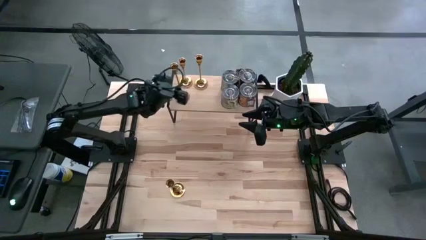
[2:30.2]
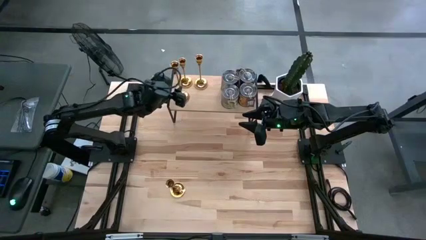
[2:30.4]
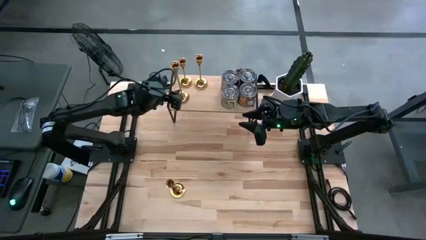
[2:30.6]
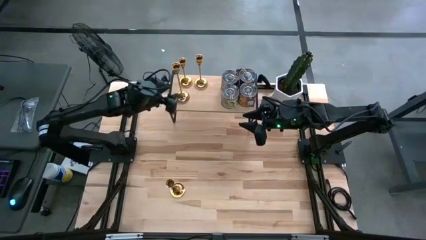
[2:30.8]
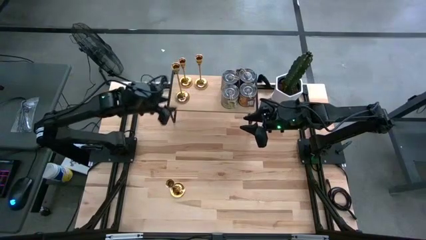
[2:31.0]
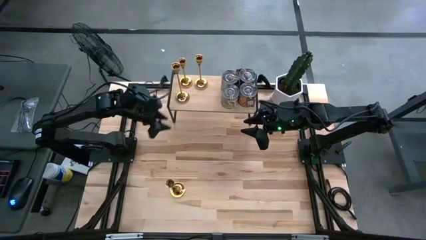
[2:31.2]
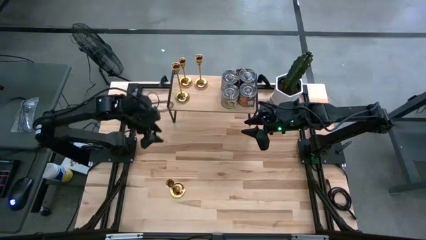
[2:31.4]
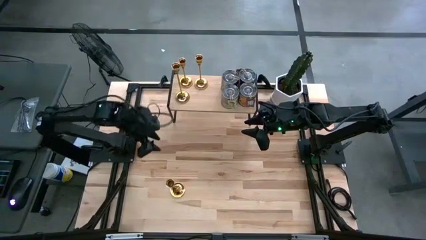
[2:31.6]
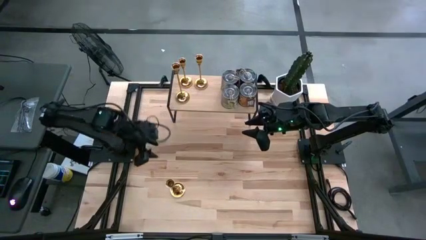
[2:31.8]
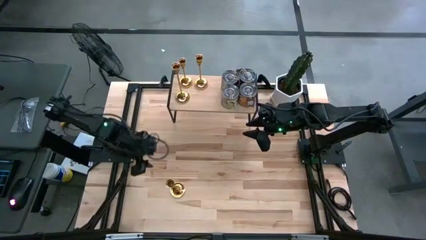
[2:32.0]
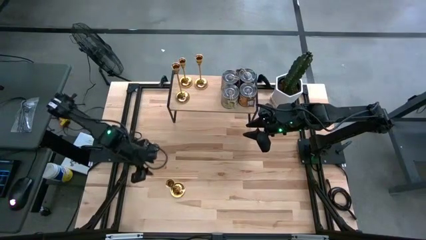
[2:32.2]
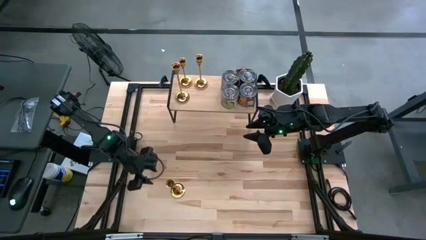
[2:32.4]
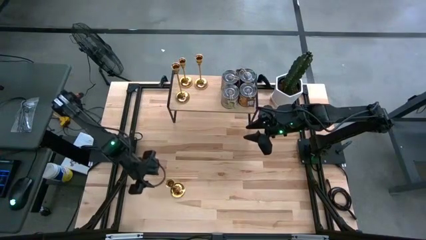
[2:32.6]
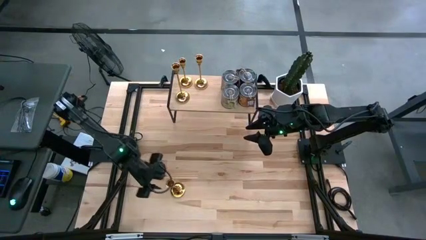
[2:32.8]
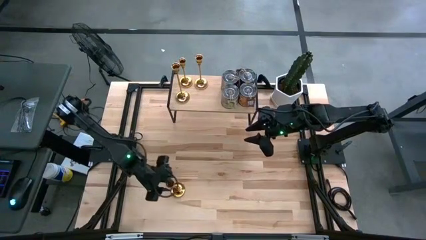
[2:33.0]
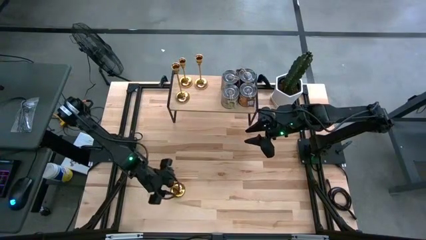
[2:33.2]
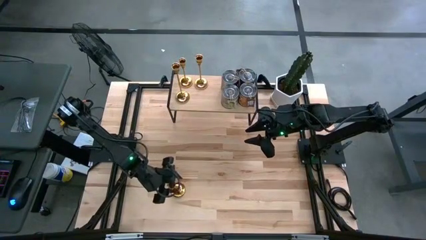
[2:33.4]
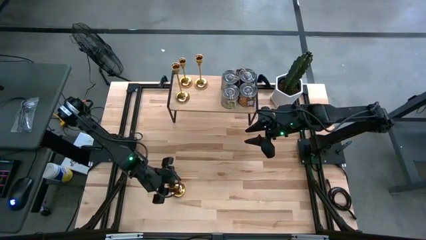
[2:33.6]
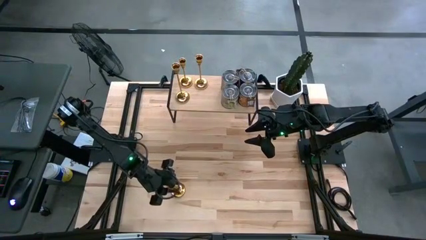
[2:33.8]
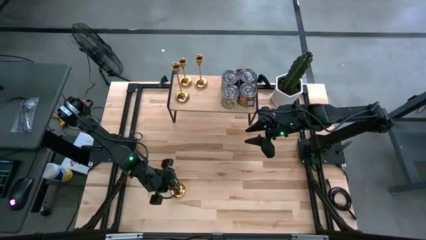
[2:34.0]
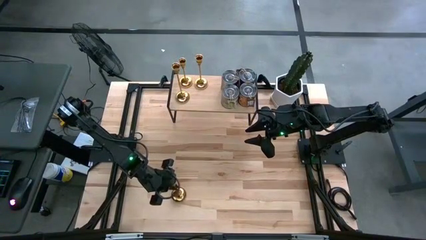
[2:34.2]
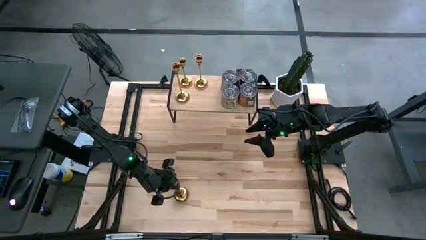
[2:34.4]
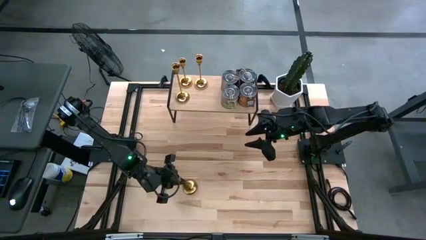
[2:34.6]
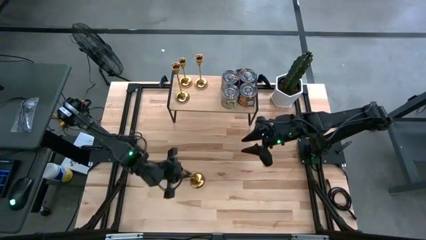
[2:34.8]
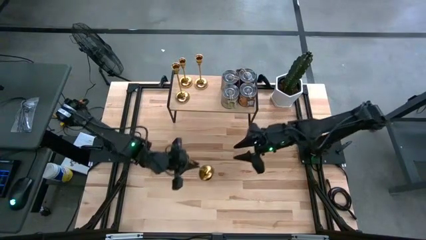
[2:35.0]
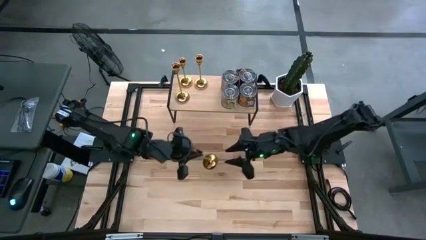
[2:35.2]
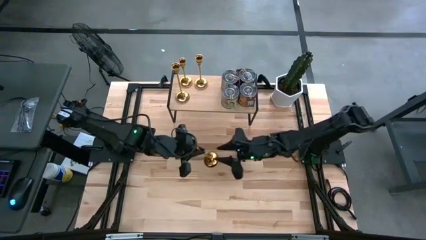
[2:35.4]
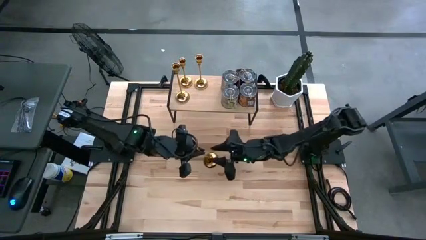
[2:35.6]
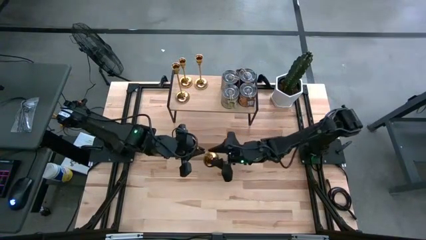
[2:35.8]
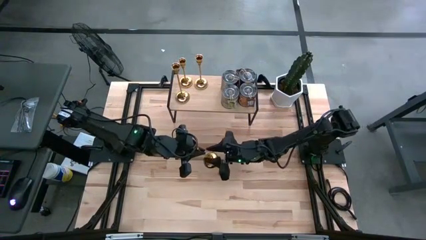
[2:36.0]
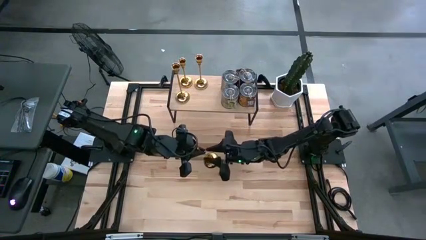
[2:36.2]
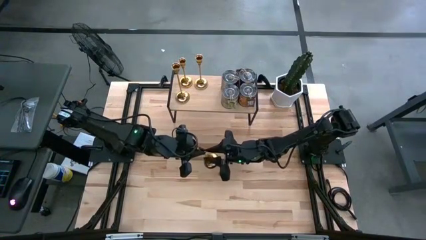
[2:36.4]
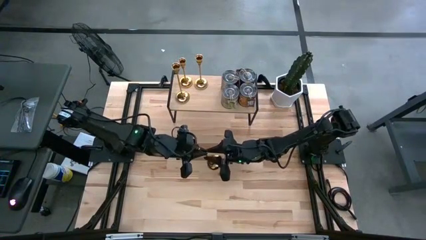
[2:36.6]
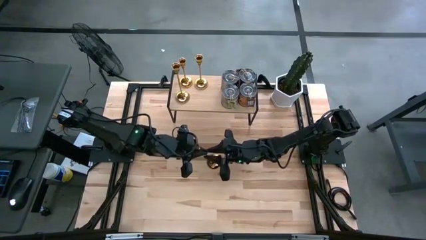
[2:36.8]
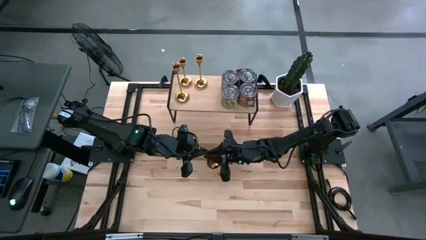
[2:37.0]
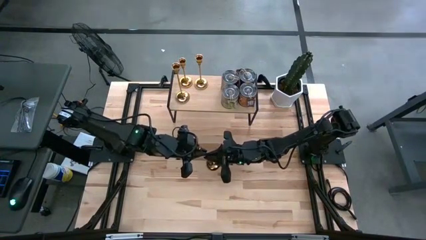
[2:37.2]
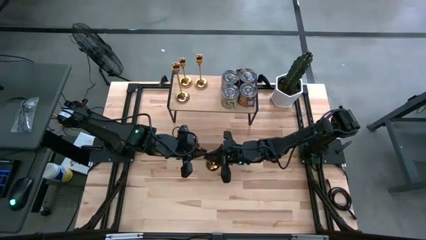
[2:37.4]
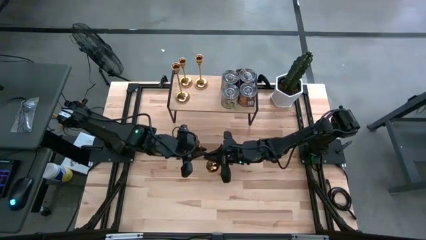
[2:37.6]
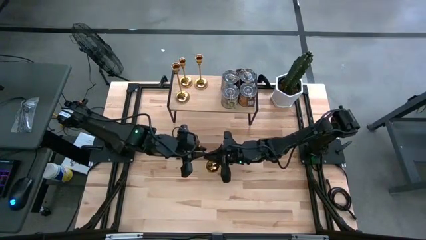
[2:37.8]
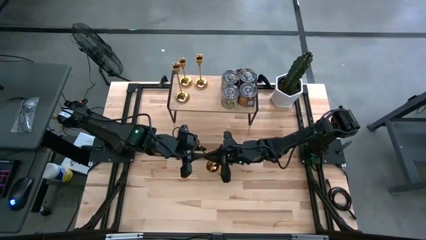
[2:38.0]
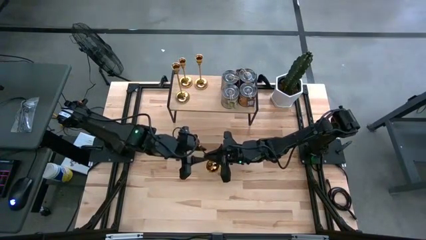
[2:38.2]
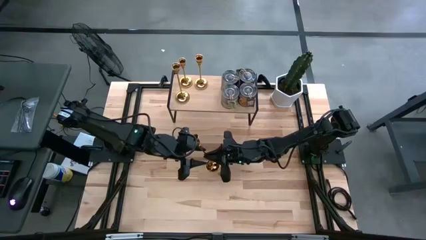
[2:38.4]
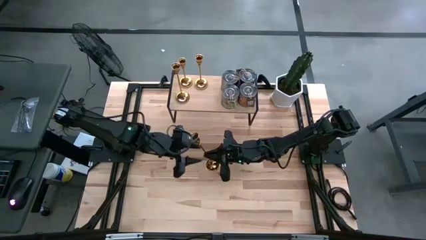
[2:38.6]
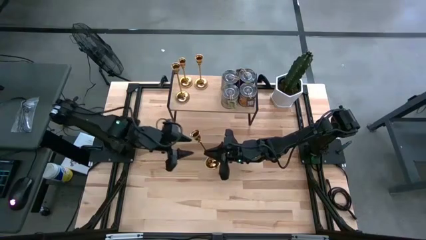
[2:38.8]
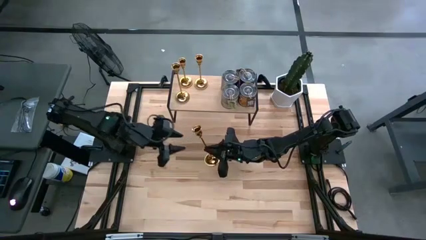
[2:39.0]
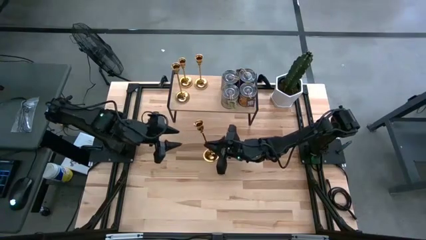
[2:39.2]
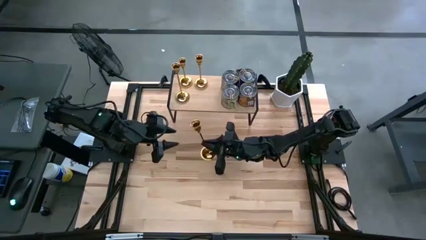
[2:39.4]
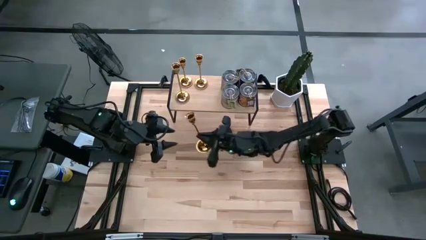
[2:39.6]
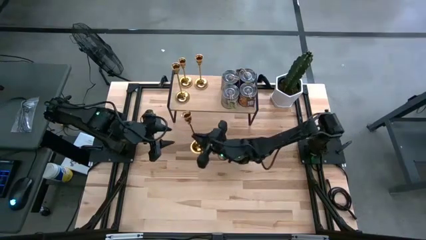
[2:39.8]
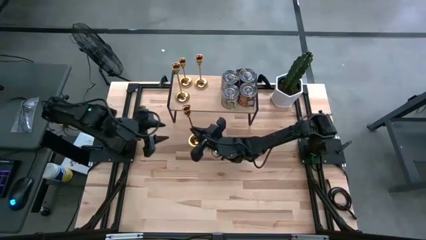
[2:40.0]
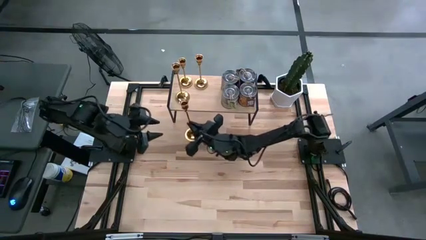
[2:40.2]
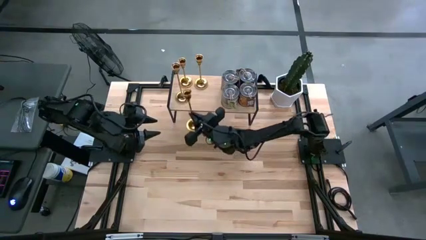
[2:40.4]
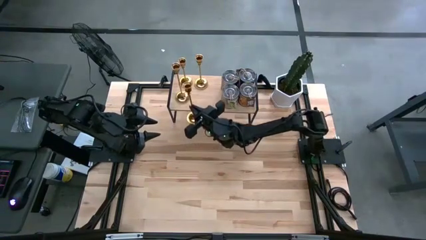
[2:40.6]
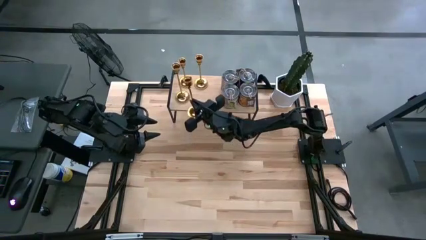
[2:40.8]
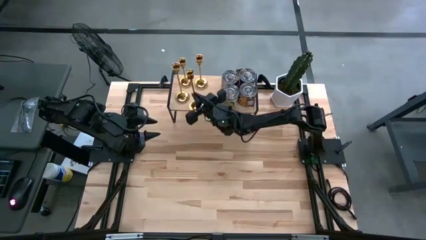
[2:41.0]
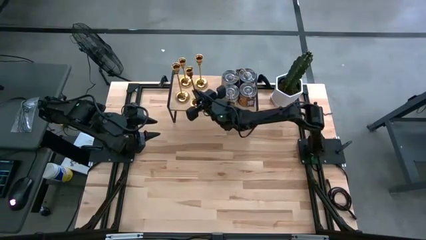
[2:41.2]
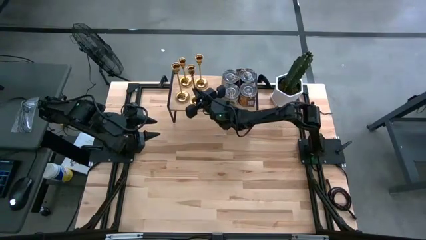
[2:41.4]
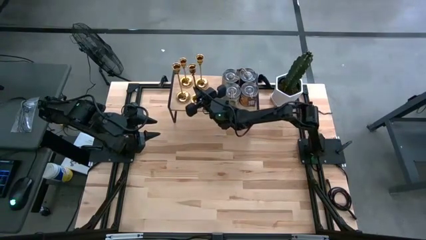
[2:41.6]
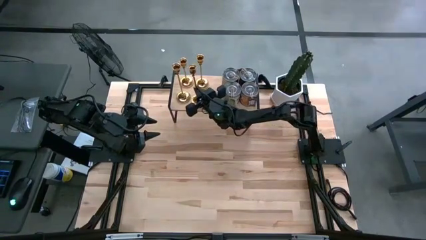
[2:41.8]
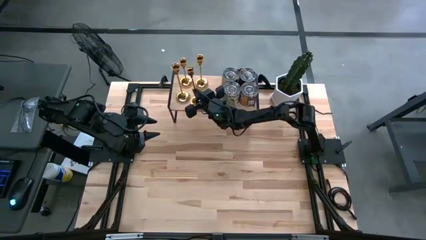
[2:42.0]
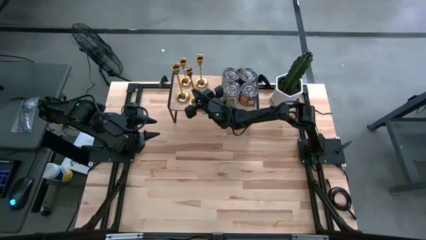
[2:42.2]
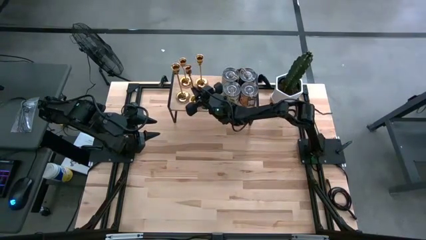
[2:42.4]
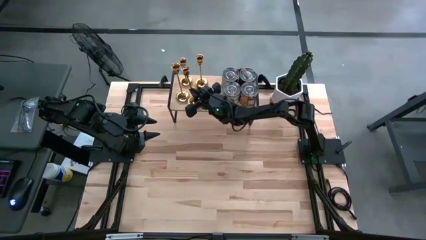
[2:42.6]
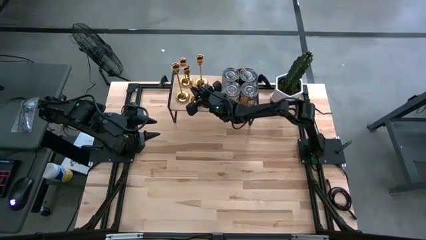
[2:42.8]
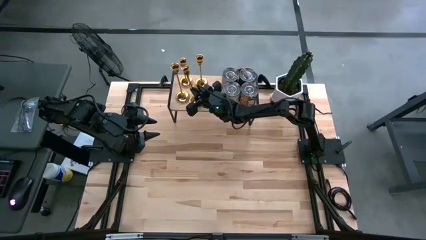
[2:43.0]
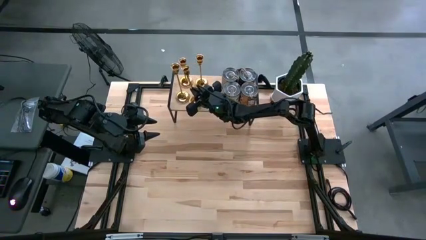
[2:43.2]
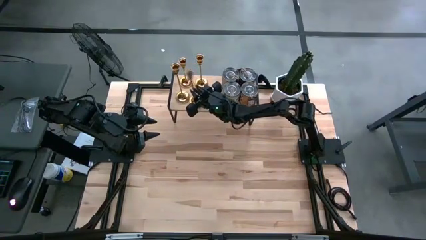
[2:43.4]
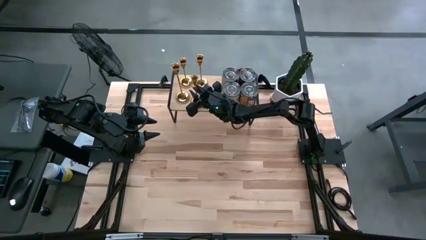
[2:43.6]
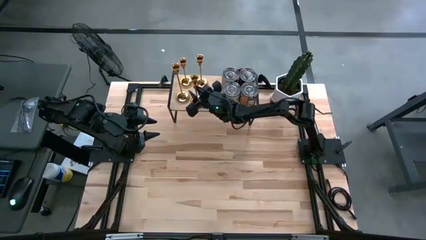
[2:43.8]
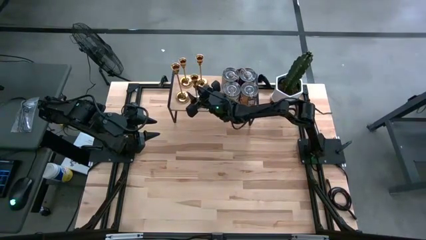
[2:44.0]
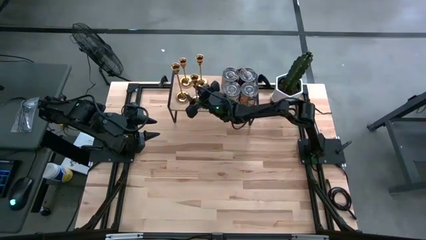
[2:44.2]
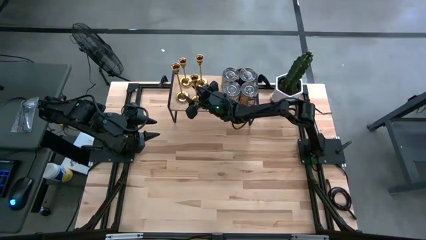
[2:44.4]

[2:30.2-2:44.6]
Task: Pick & Place candle stick holders
Put the gold candle holder on the shelf
